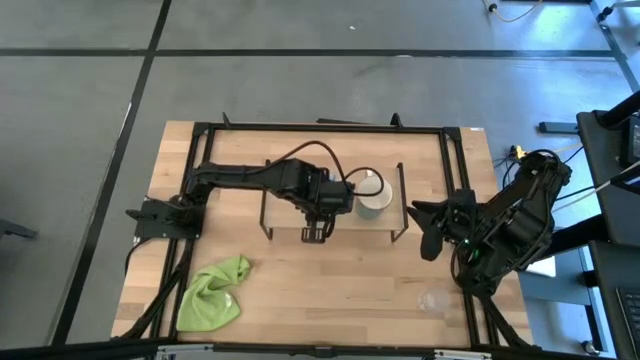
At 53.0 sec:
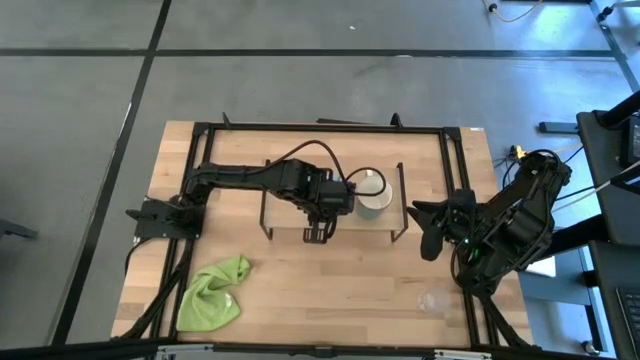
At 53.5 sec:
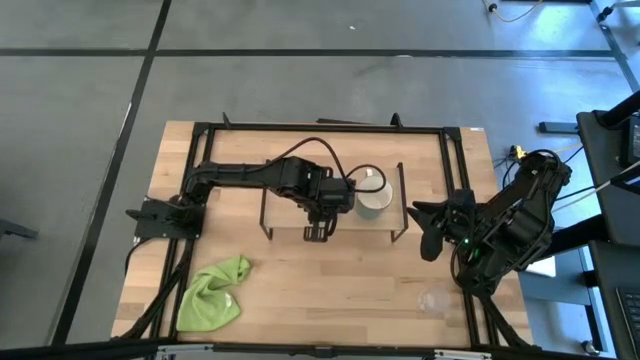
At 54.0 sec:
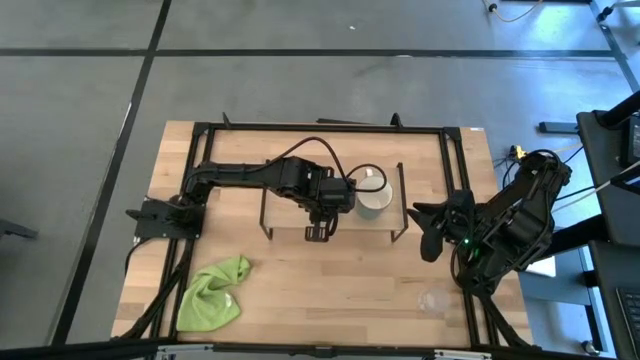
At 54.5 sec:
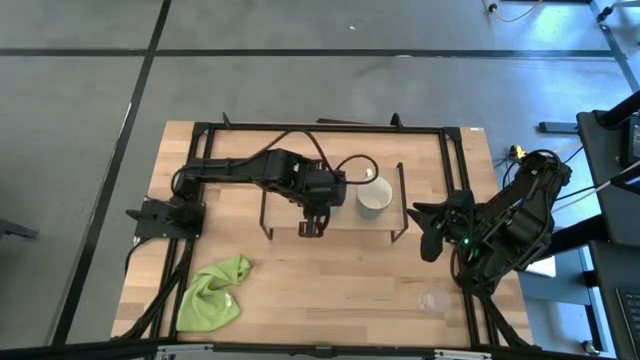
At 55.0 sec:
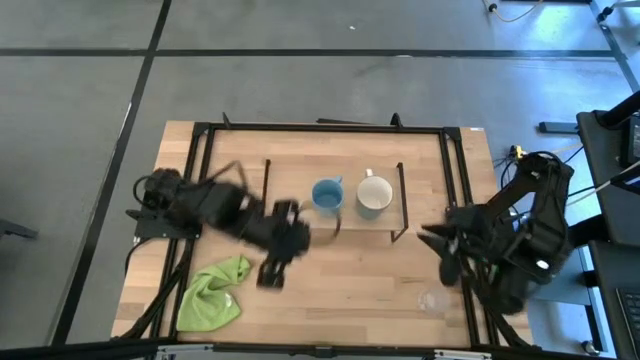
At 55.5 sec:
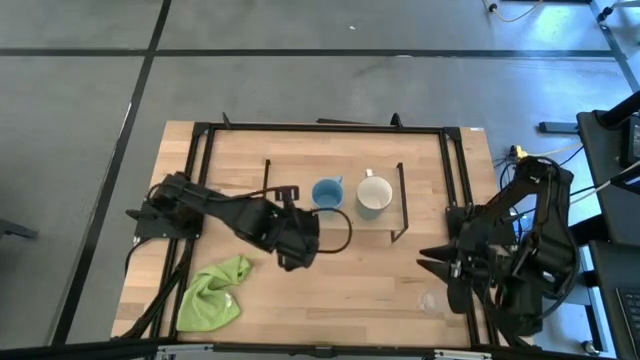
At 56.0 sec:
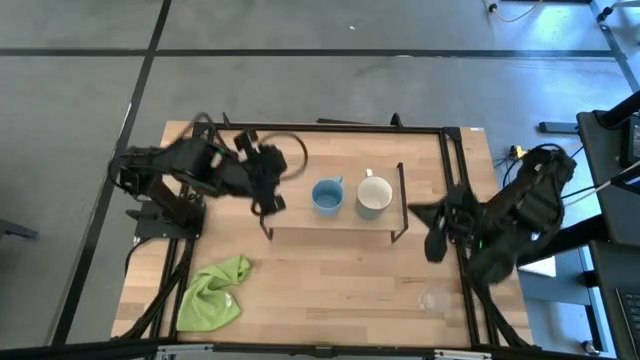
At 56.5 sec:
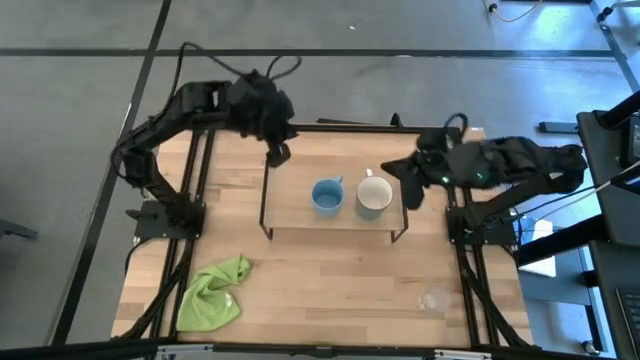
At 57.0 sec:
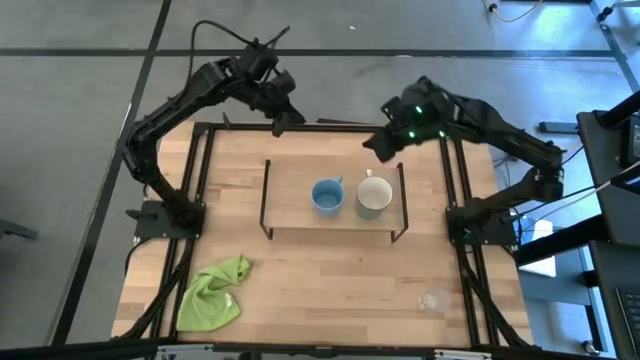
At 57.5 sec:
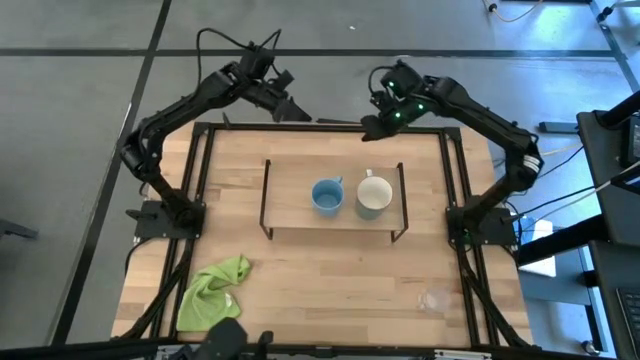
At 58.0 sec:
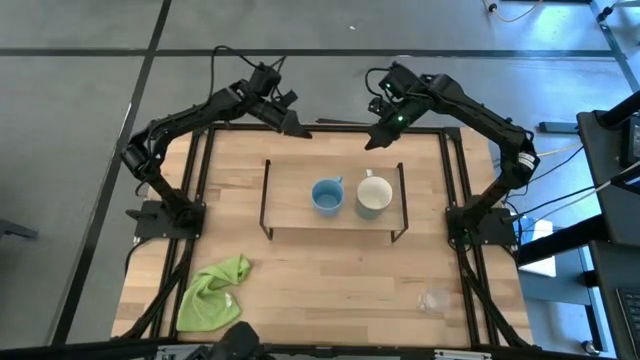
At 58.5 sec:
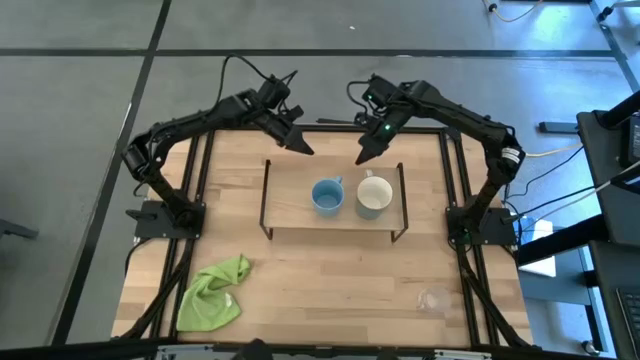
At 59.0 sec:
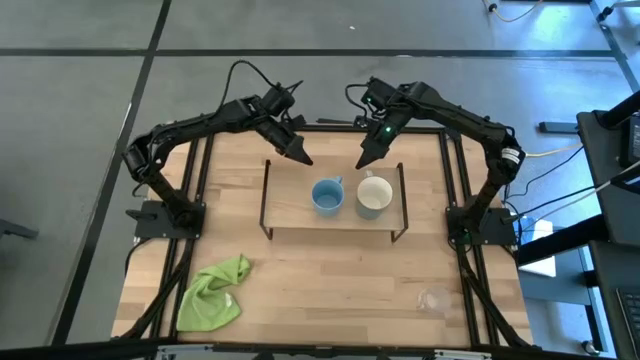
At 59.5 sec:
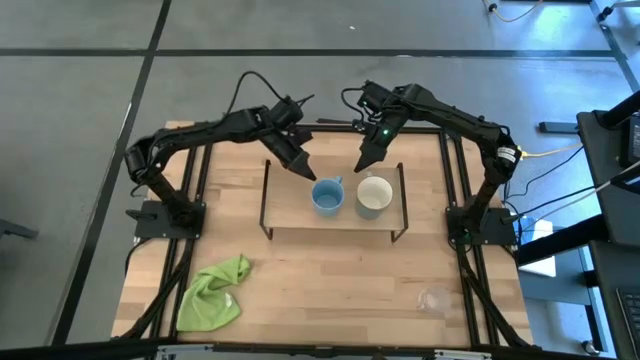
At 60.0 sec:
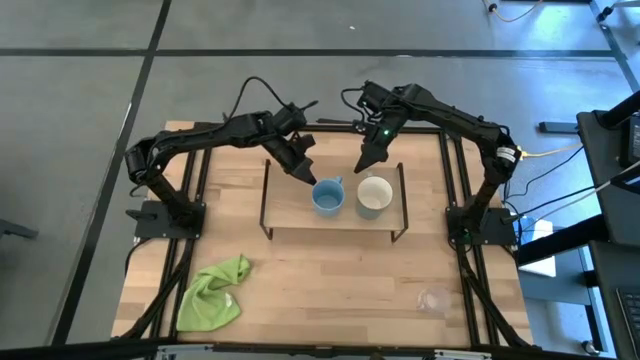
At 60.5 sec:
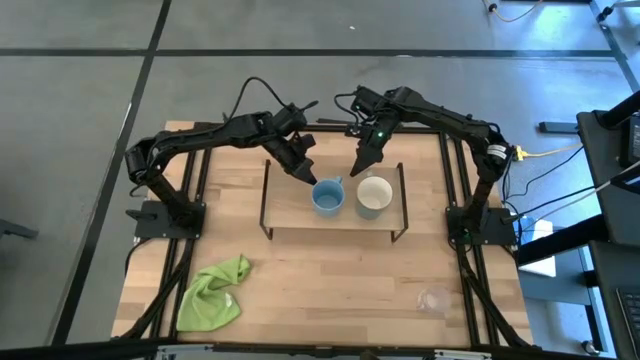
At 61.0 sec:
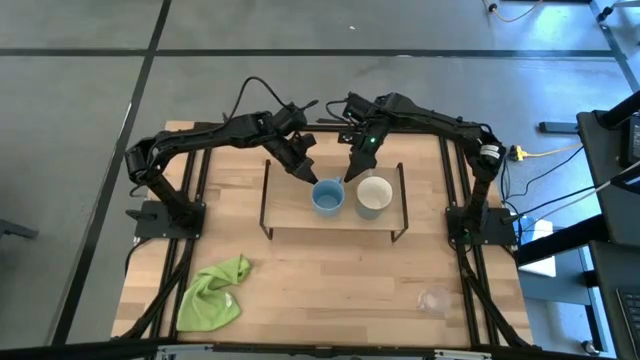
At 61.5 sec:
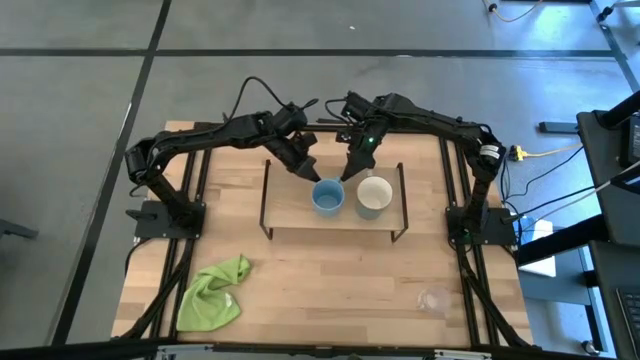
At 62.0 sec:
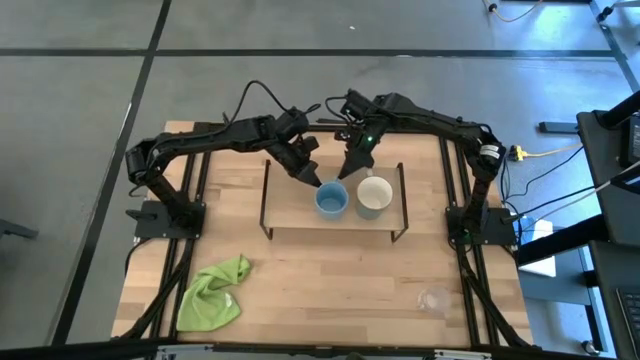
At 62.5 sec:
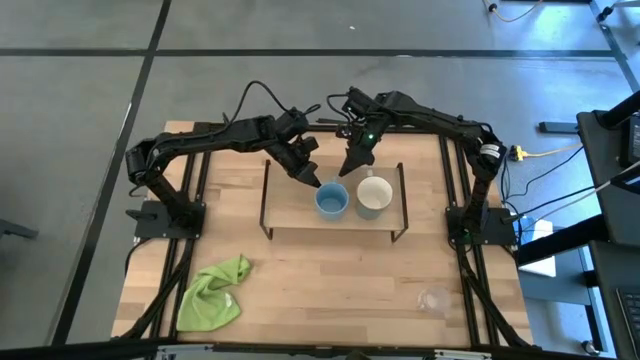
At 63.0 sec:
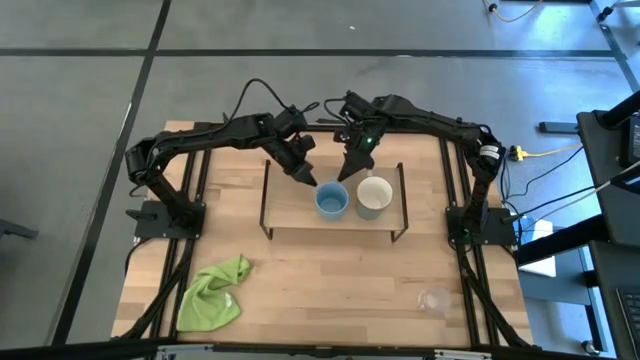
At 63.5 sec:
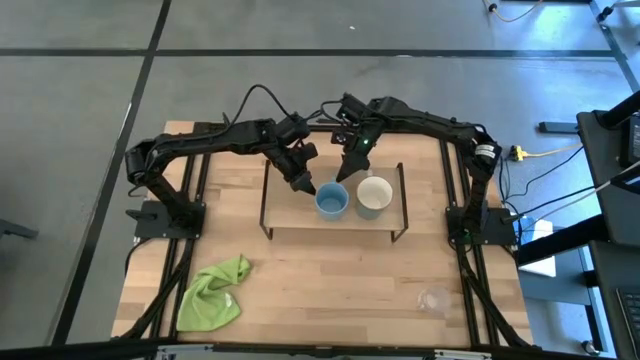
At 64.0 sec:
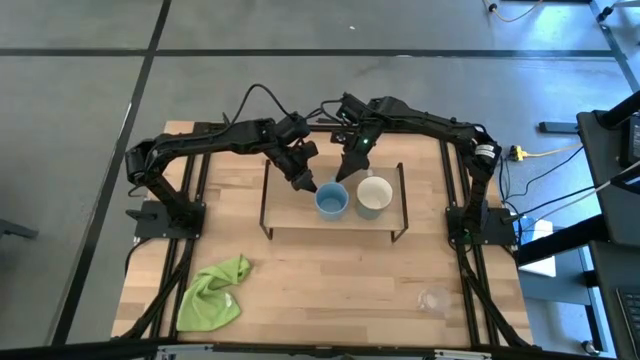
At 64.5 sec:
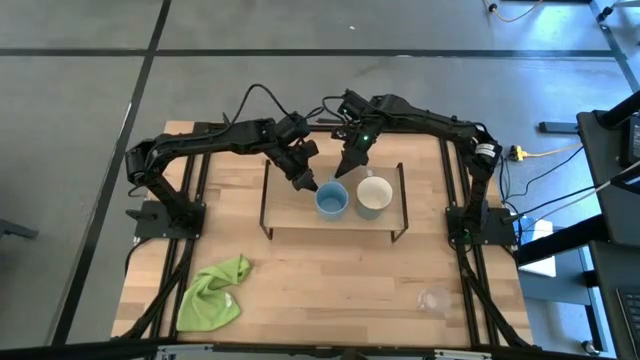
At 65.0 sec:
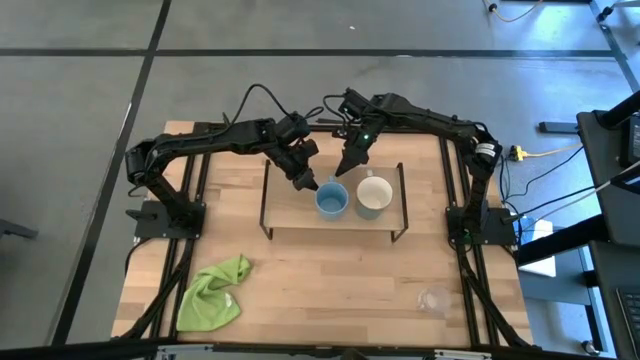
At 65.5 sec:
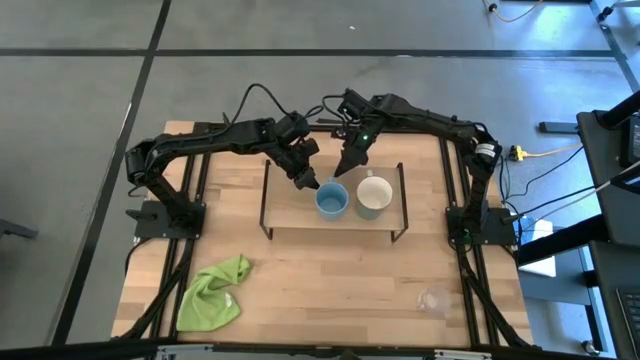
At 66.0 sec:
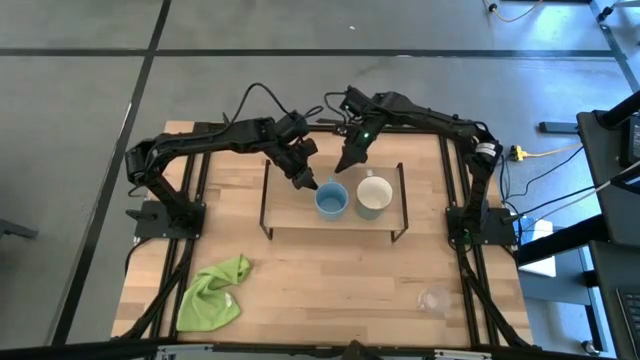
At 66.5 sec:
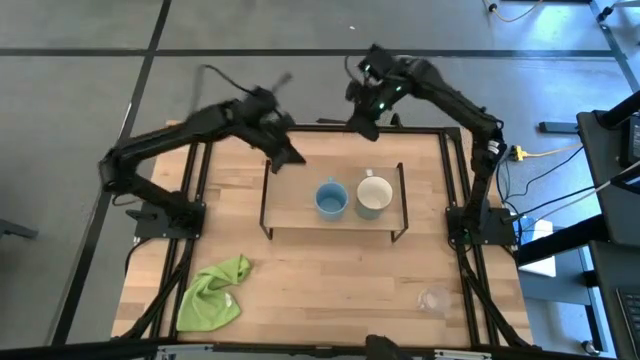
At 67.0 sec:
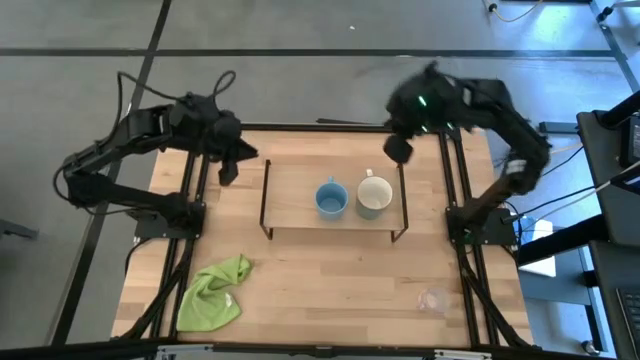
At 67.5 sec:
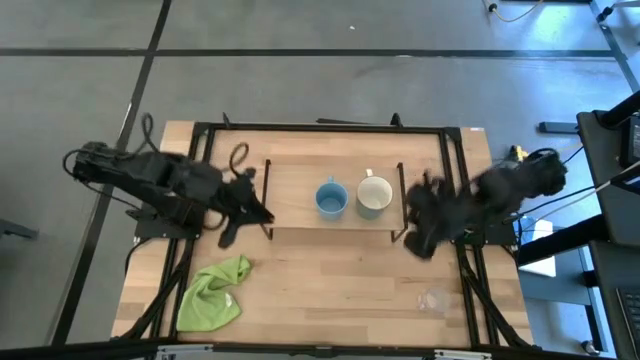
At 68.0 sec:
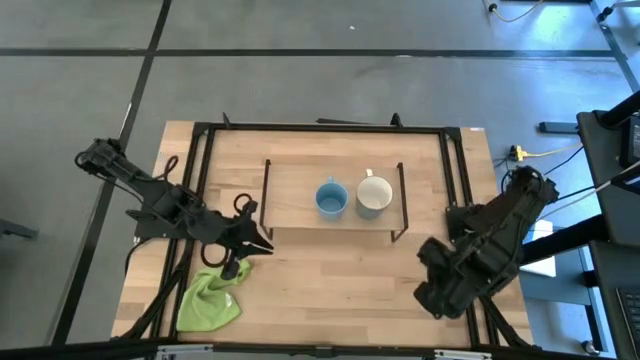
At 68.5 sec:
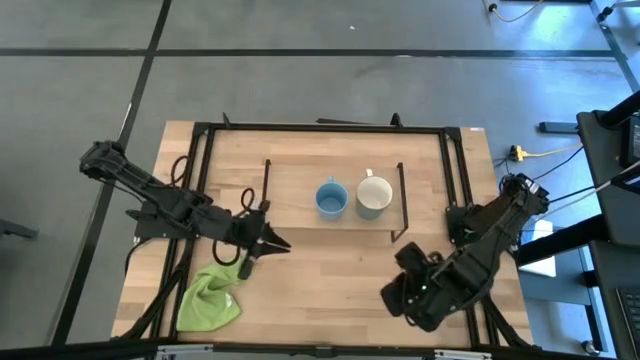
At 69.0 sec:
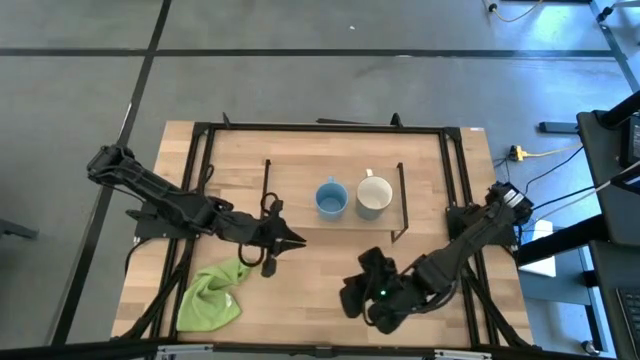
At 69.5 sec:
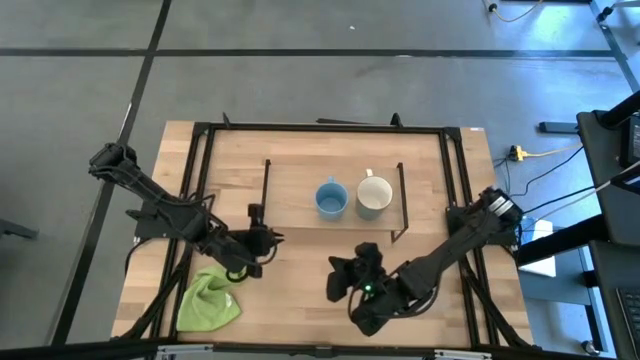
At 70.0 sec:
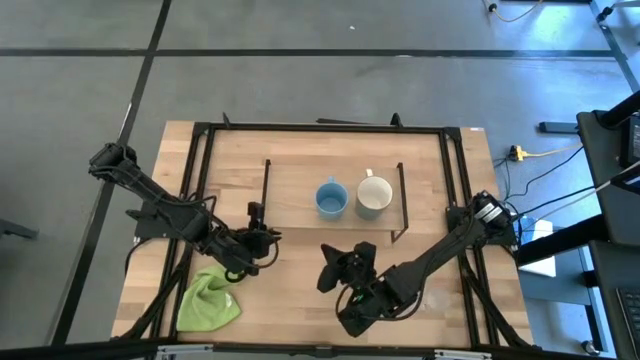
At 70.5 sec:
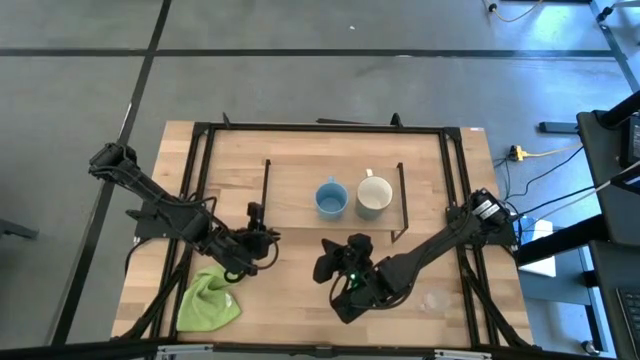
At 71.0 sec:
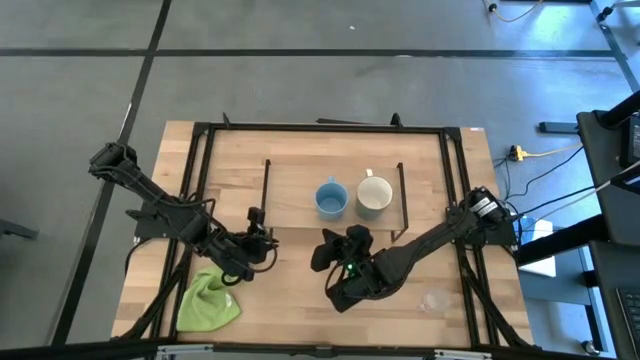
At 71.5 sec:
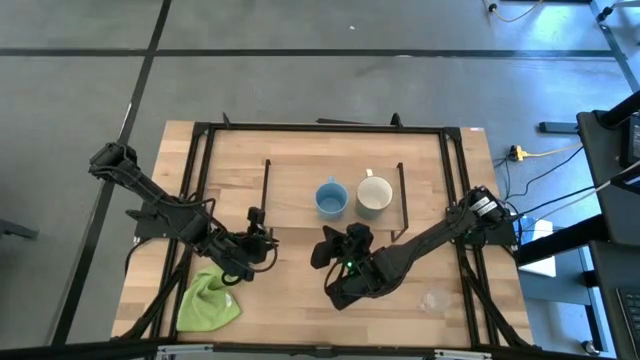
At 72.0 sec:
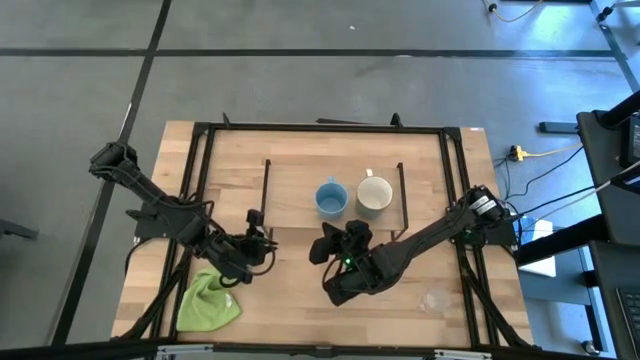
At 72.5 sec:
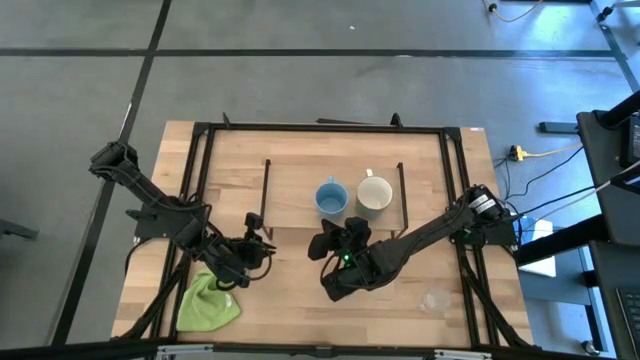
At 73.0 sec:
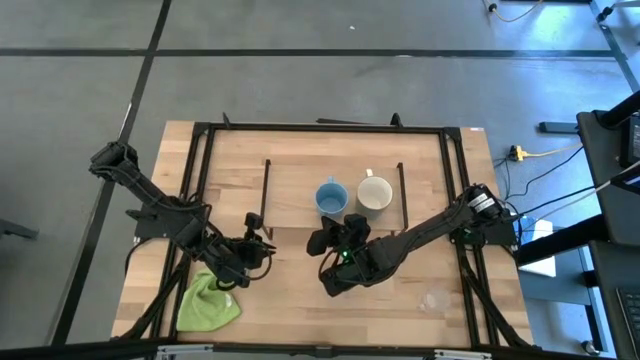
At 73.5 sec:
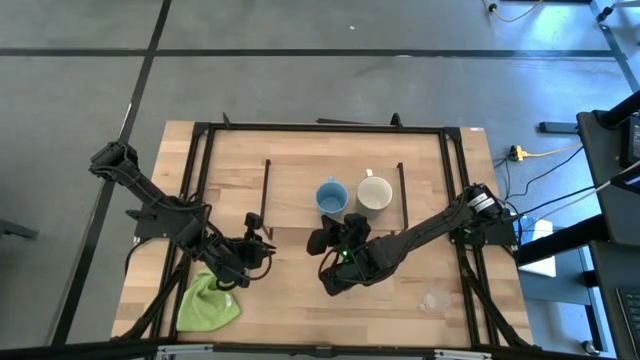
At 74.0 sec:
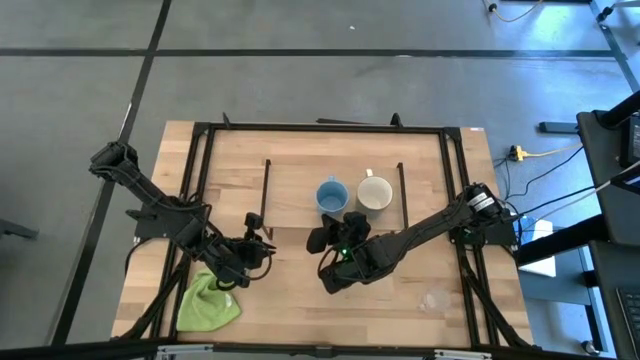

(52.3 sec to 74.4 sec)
Task: Stack small to large cups/mugs on shelf
Put the blue mug on the shelf
